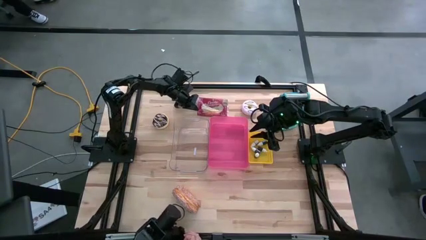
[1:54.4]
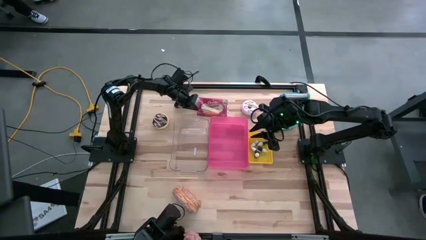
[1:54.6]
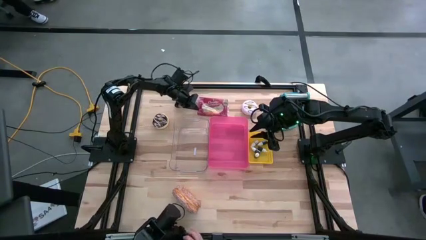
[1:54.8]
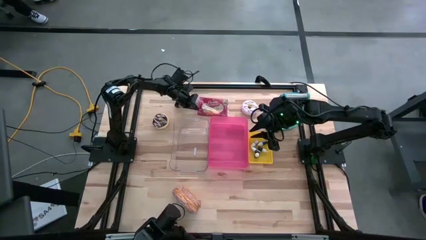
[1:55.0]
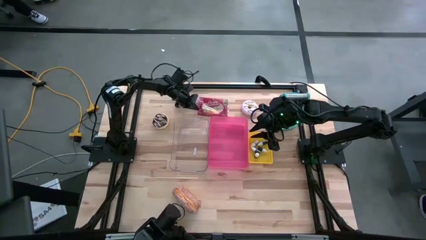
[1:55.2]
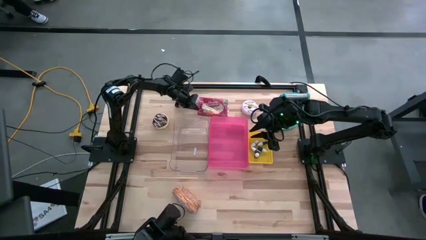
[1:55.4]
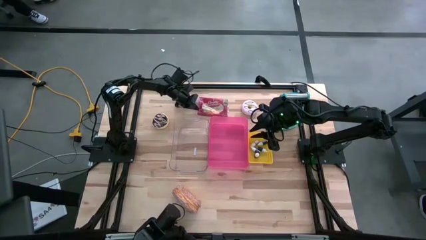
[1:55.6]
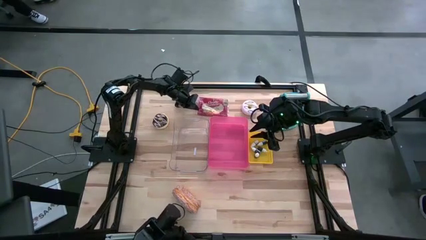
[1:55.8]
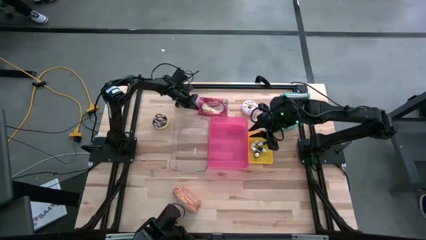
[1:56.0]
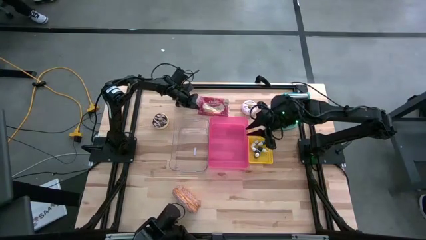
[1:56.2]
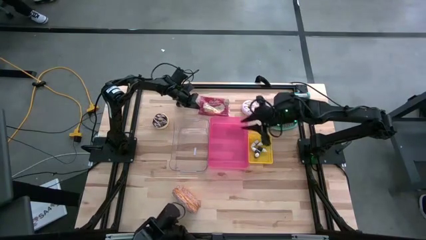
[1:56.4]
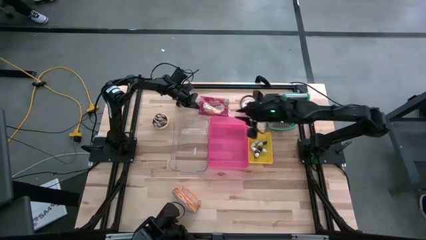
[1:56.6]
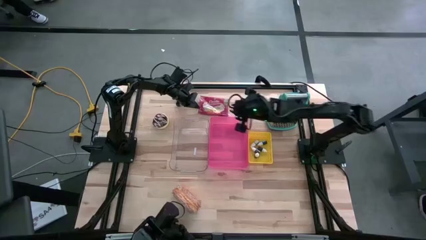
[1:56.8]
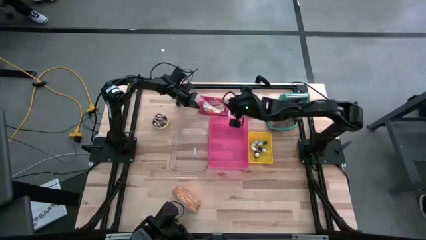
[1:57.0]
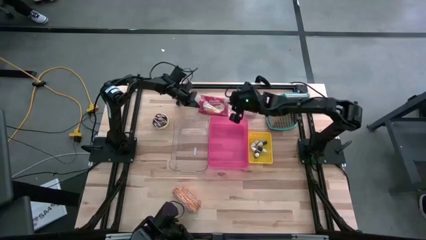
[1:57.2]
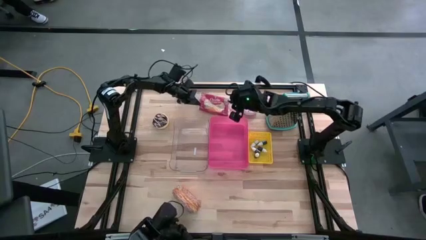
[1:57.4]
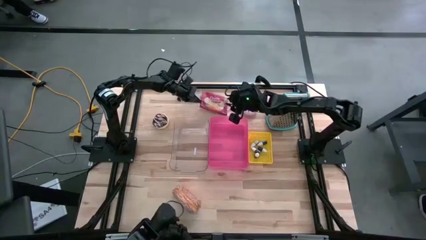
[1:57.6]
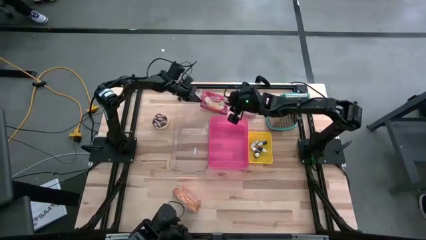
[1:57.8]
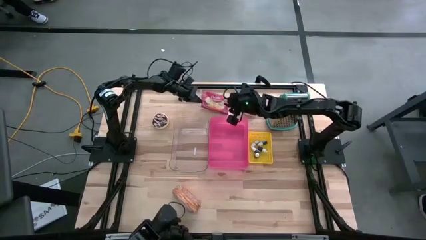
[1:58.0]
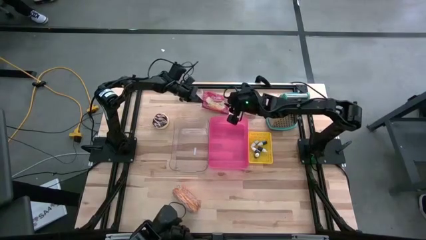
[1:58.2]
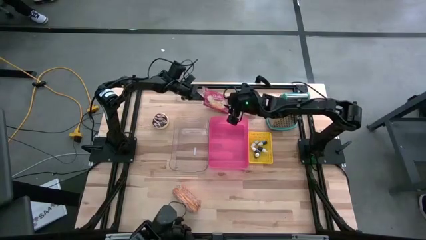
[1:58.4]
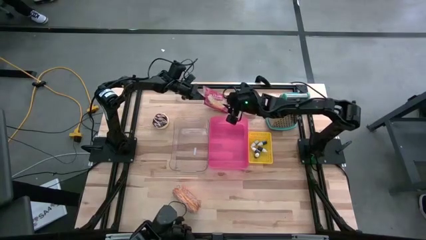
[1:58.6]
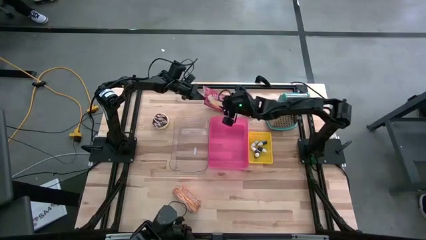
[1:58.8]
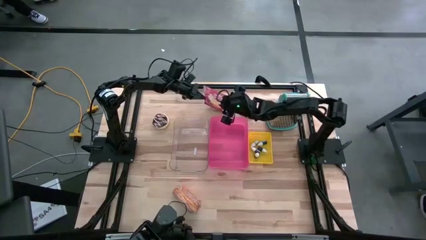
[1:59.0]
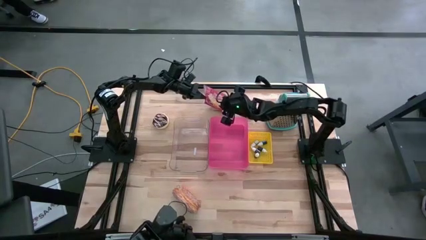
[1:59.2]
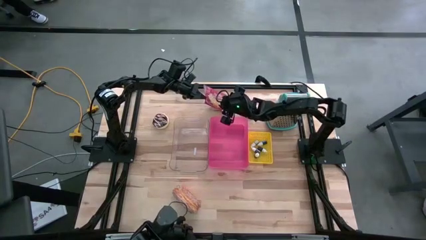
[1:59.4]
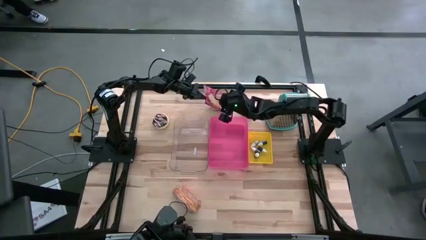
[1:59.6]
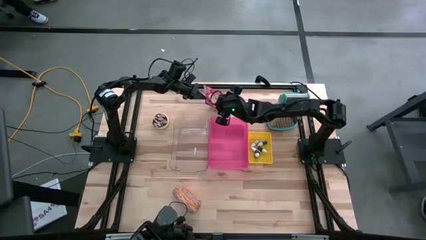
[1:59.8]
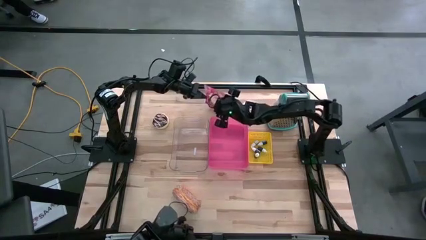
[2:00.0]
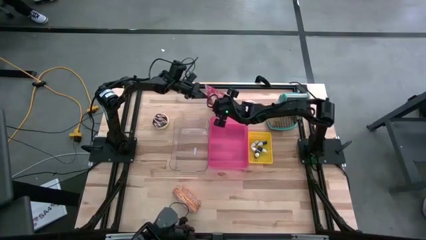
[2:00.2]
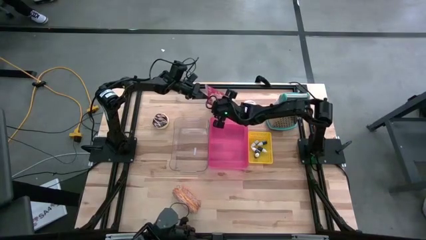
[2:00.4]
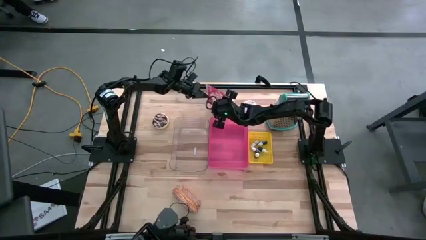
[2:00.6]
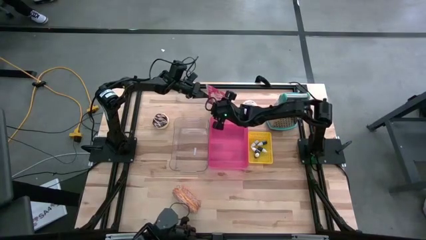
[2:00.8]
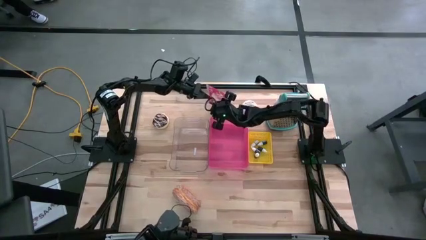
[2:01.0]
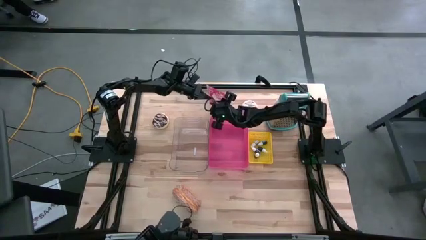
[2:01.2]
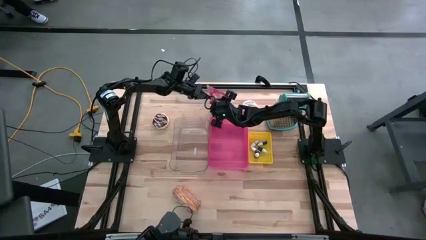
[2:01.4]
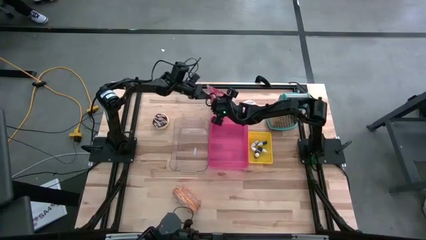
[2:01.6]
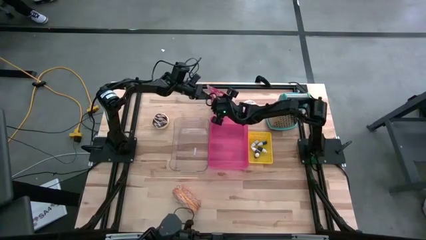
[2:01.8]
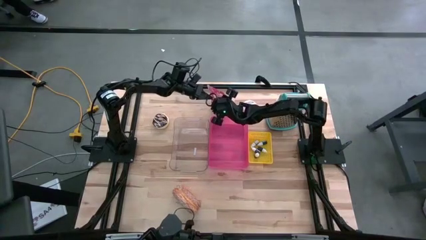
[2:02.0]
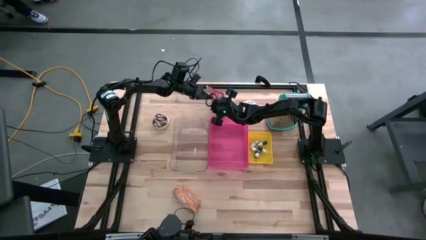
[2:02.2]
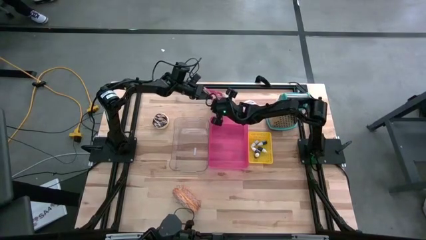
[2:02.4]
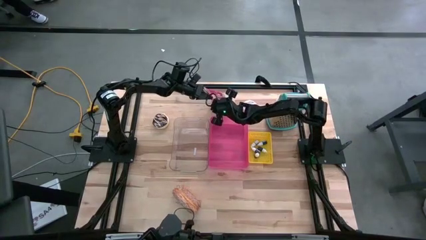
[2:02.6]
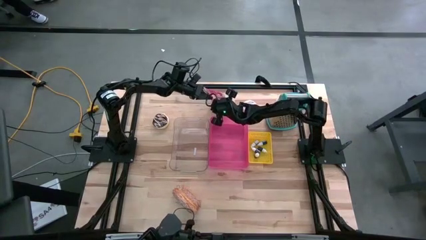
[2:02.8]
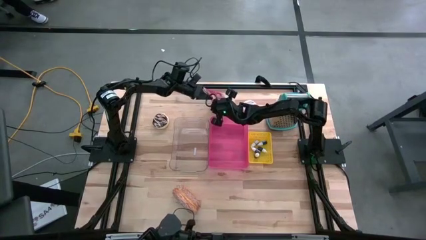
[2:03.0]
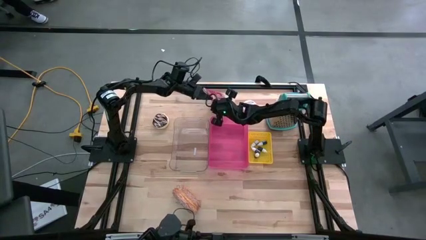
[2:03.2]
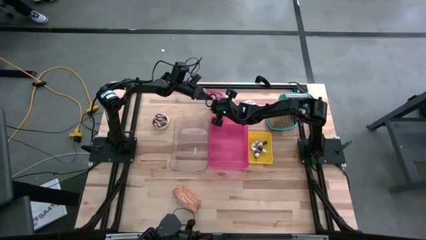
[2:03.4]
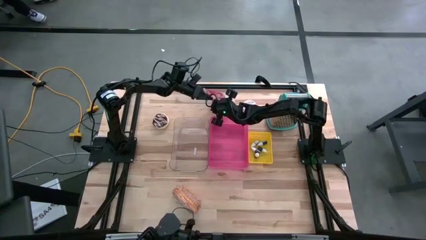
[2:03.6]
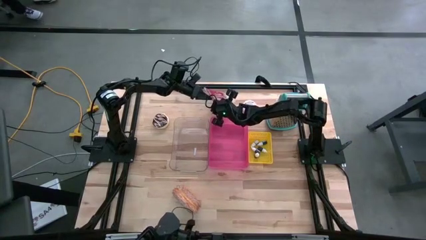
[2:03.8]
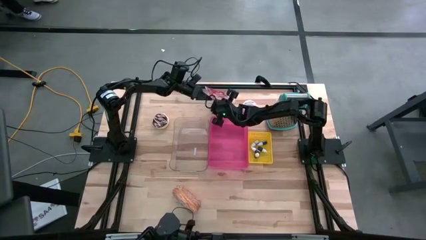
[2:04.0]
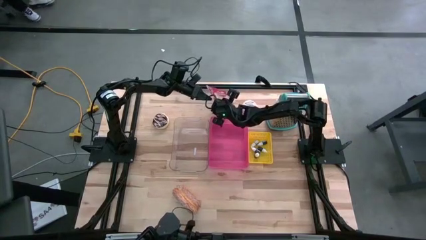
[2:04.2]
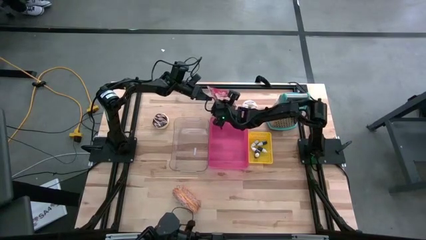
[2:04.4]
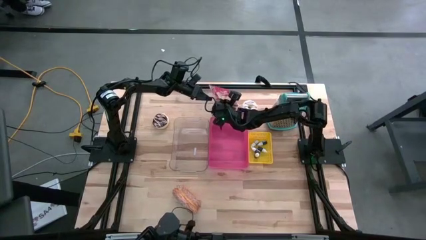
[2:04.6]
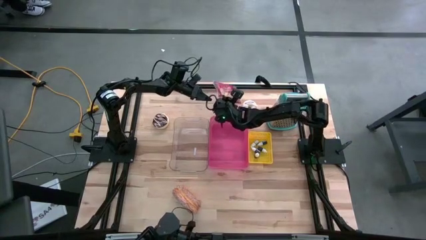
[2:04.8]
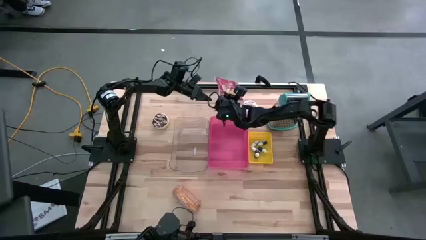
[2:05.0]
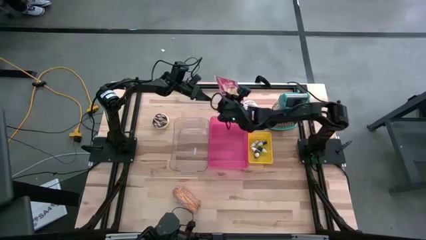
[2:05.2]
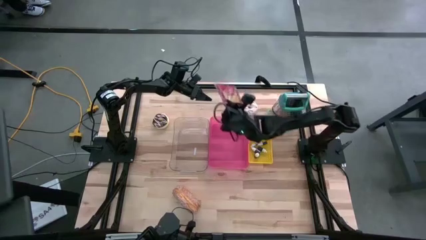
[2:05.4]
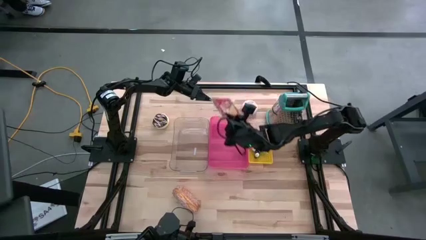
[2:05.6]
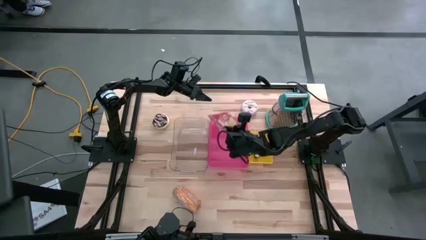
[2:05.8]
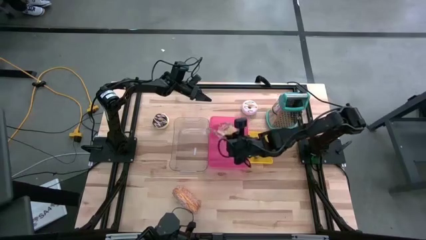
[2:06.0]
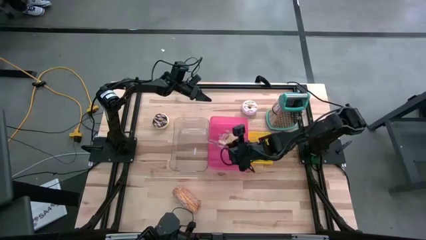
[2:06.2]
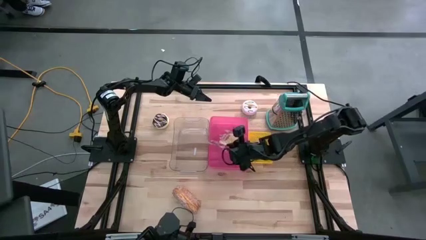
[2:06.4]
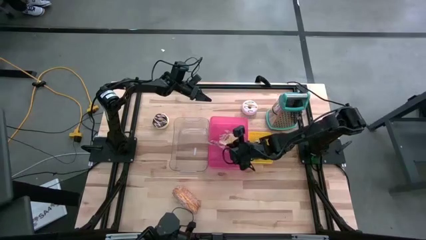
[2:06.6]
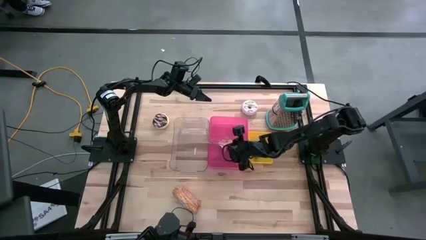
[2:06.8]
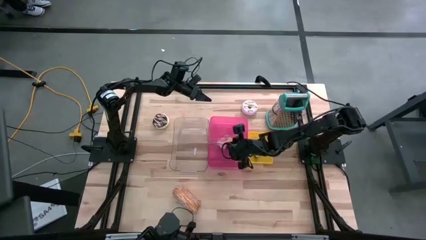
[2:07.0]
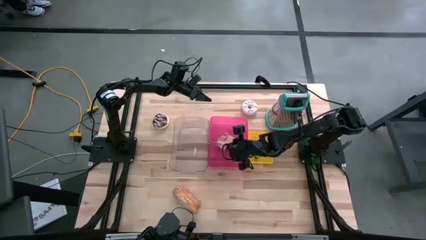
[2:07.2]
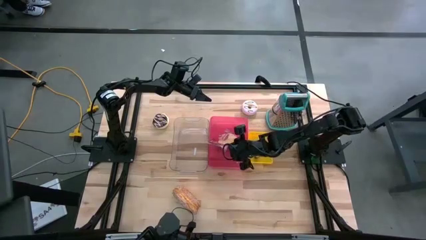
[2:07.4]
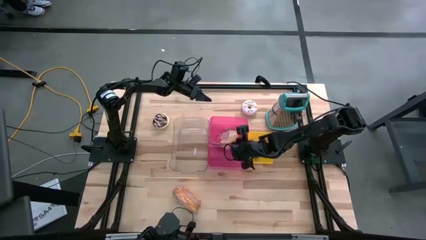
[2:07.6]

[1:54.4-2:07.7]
Put the popcorn bag into the pink bin
